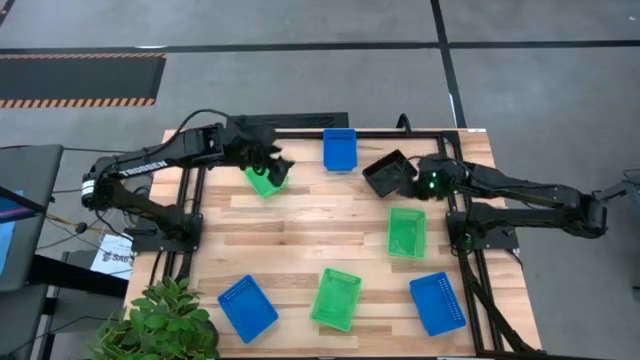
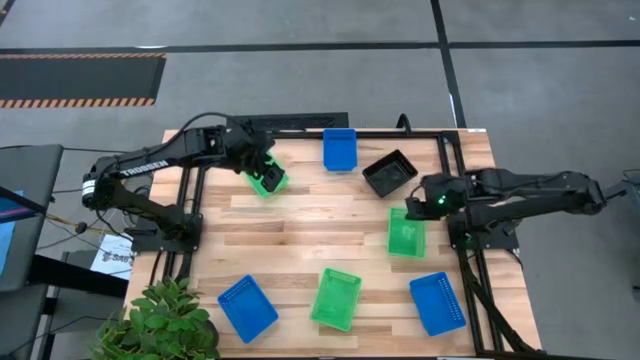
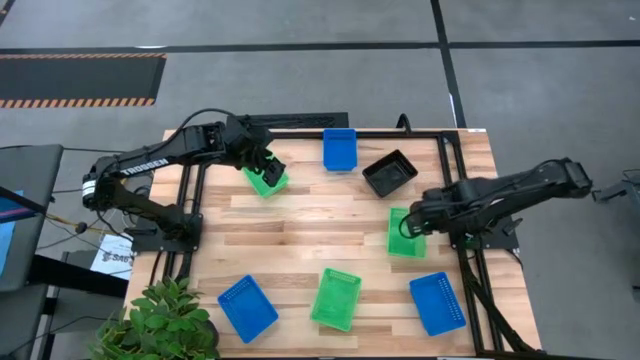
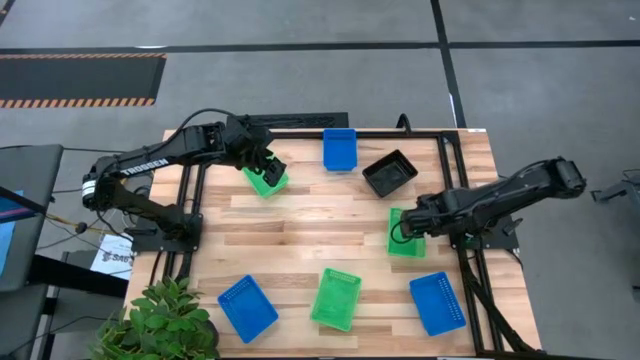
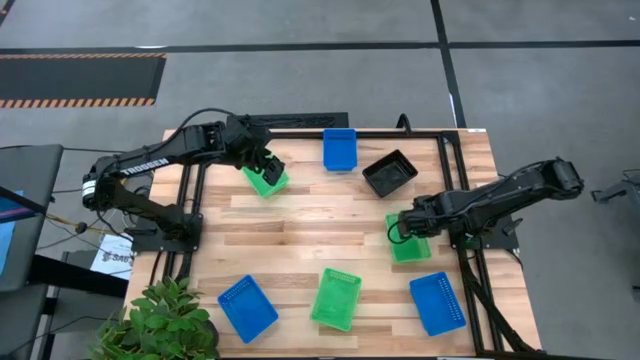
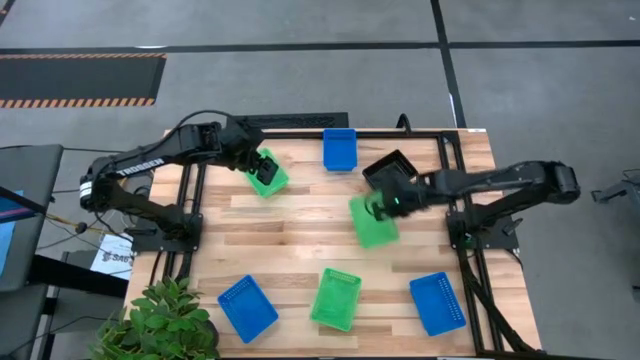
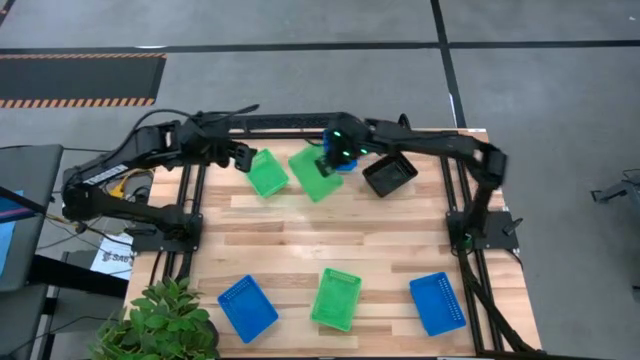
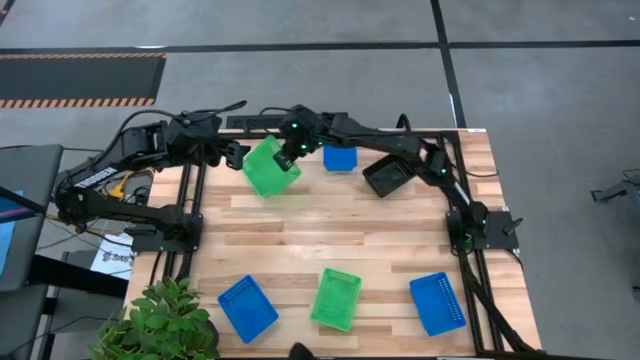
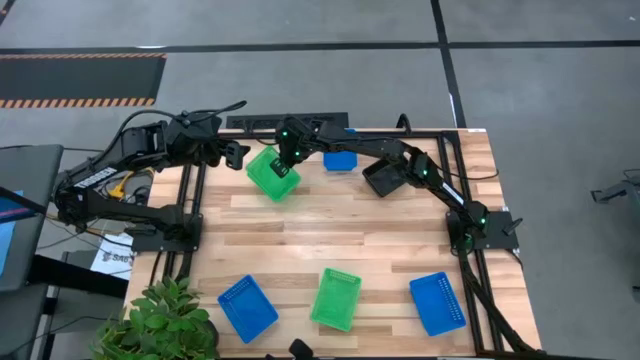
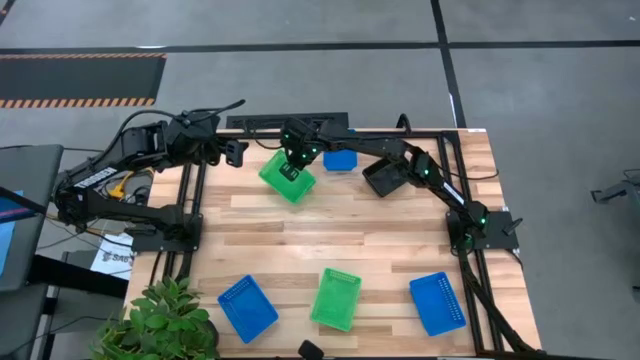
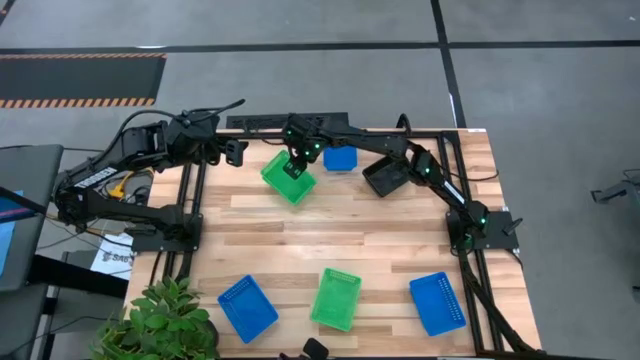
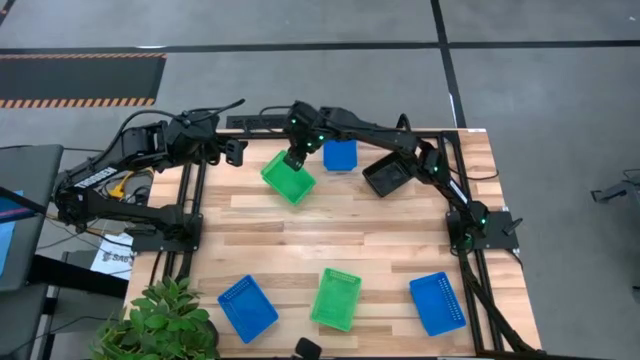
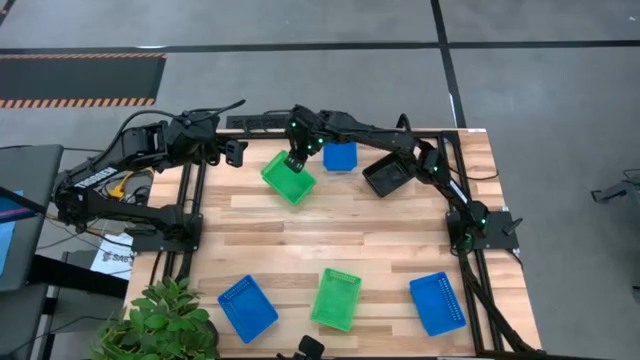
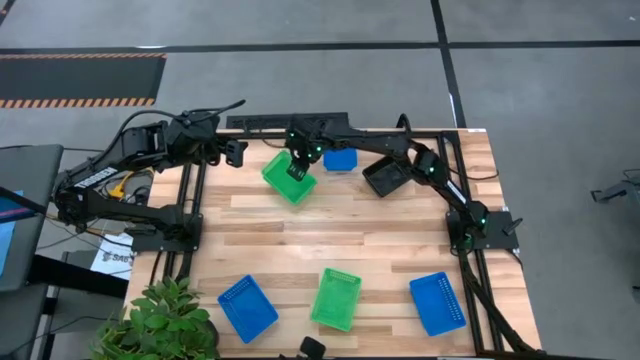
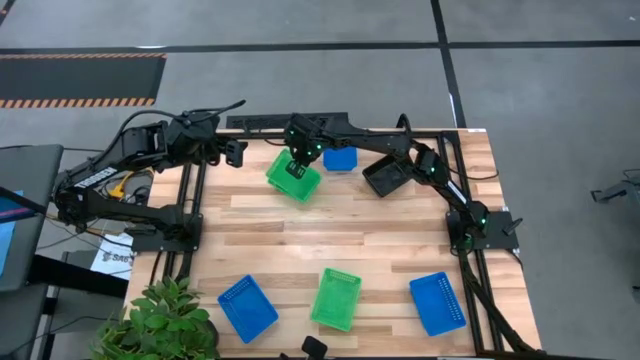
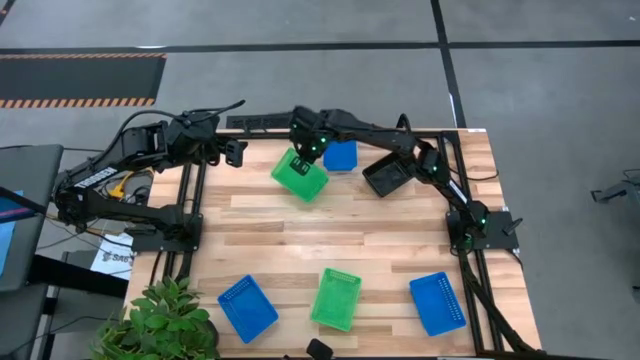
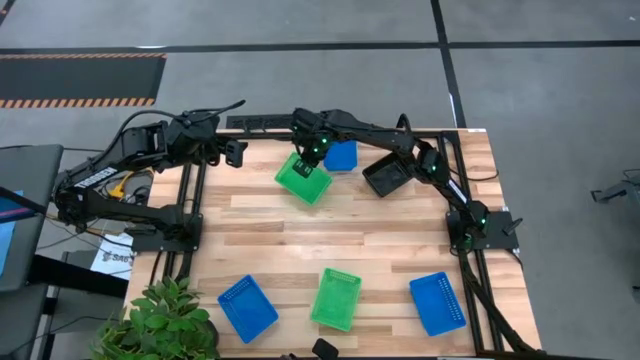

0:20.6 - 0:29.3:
Stack the middle green bin on the top green bin

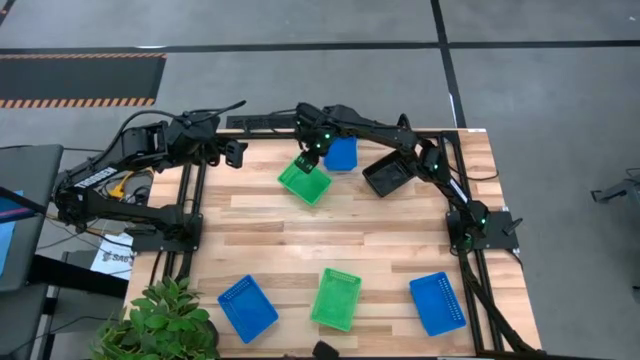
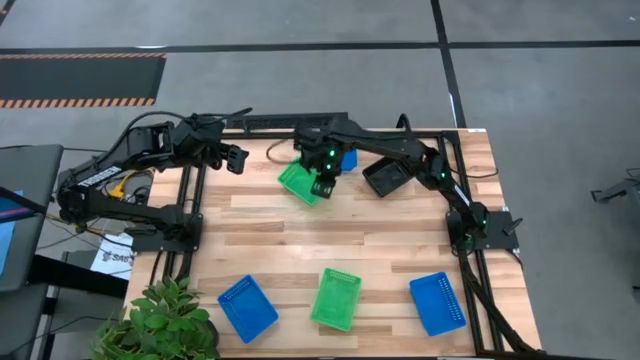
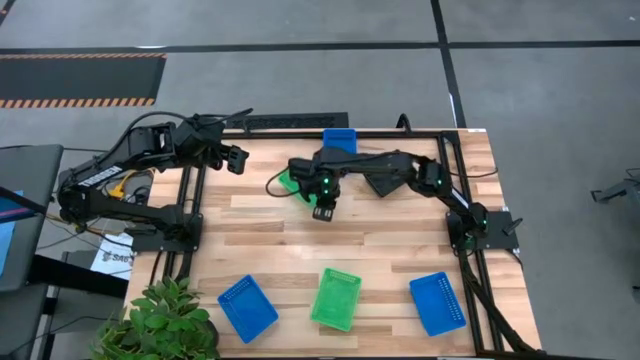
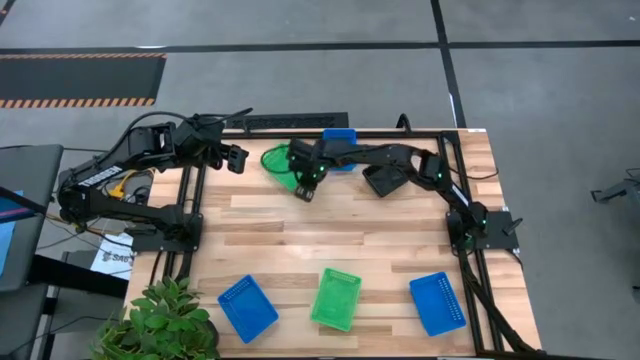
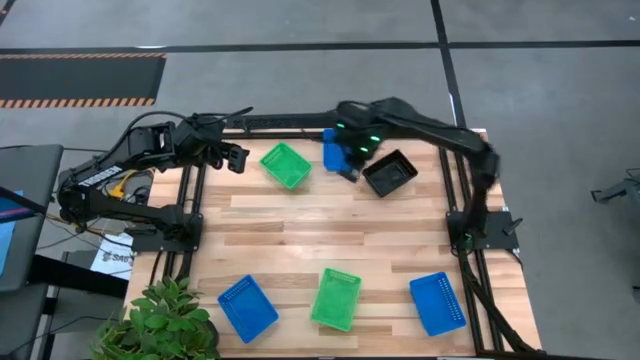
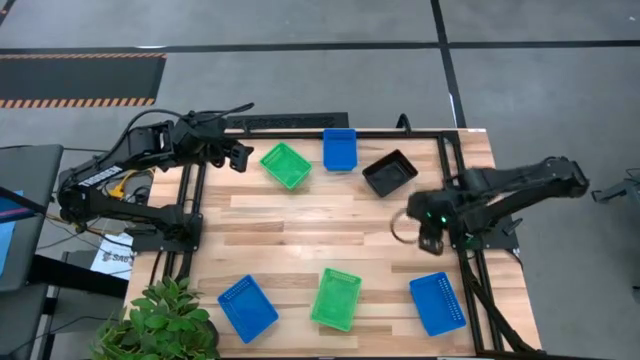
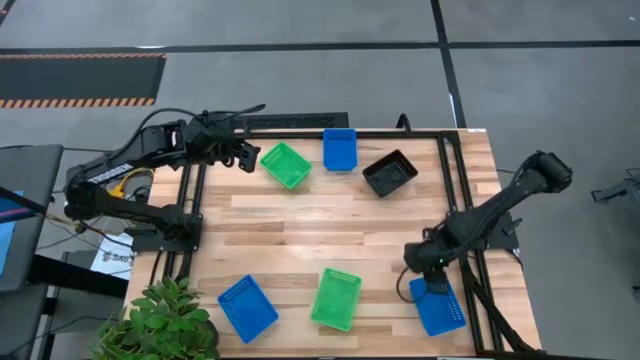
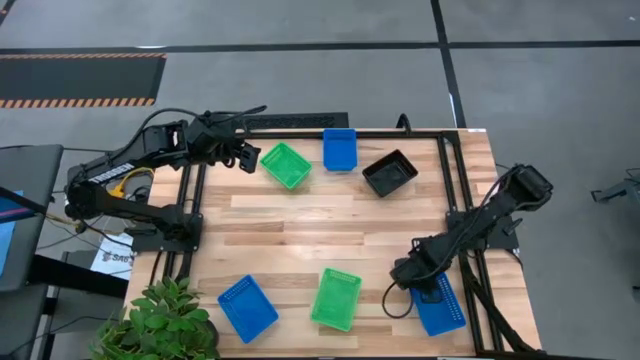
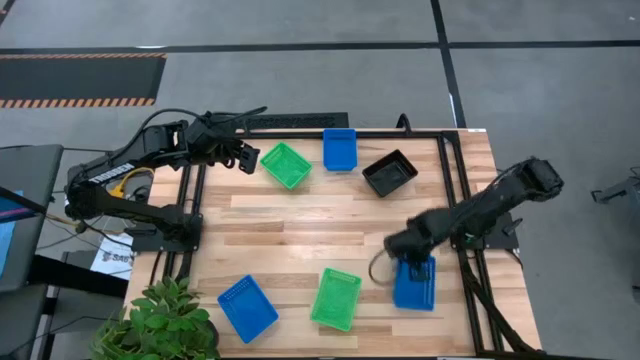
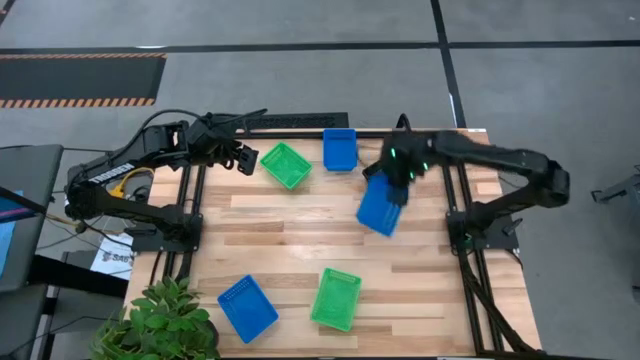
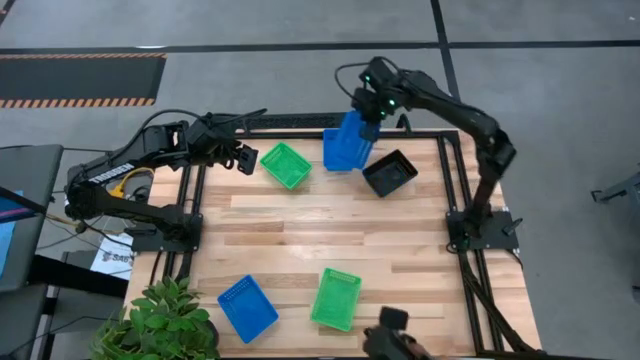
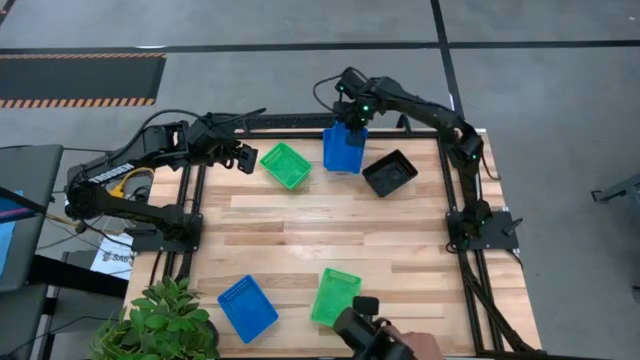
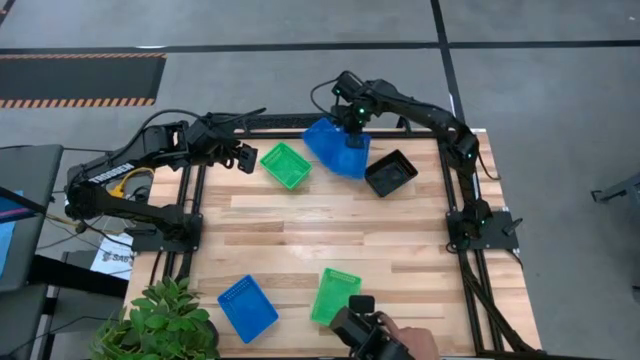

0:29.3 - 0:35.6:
Stack the bottom right blue bin on the top blue bin

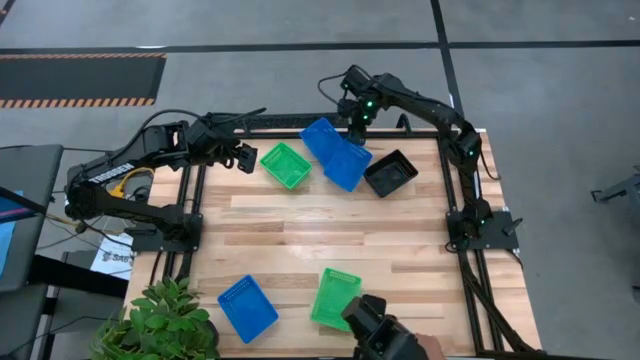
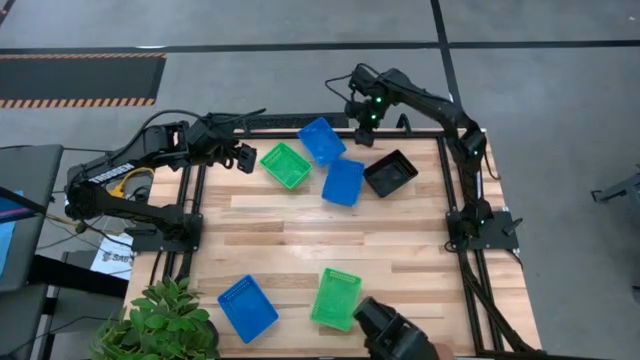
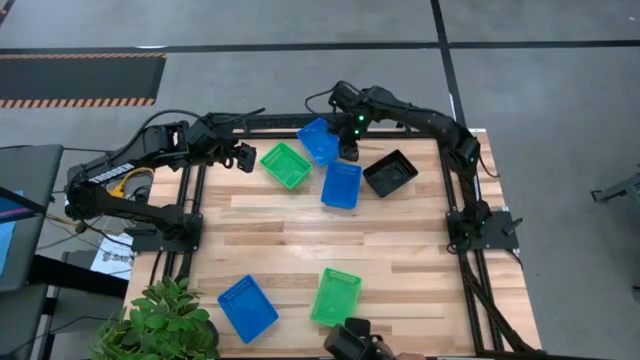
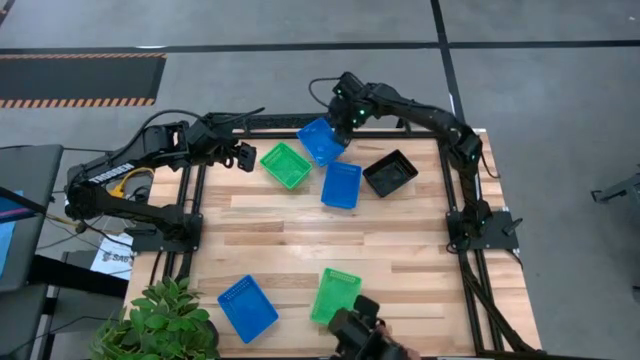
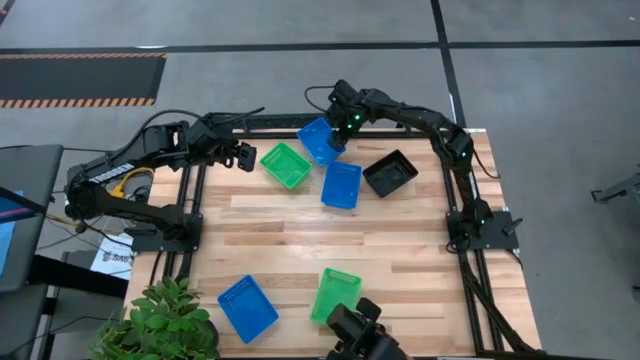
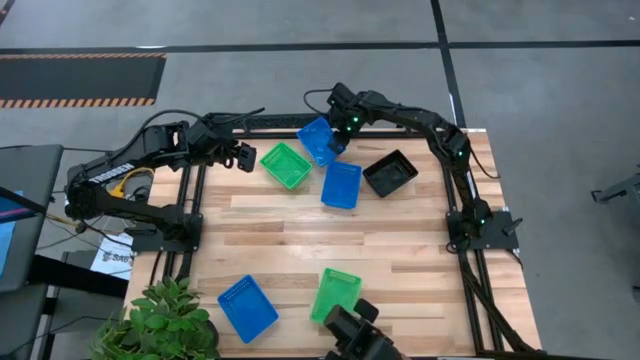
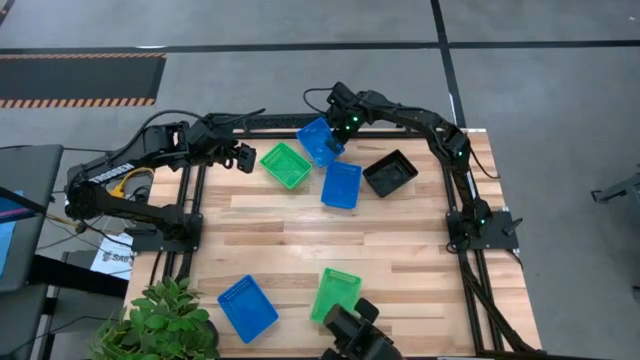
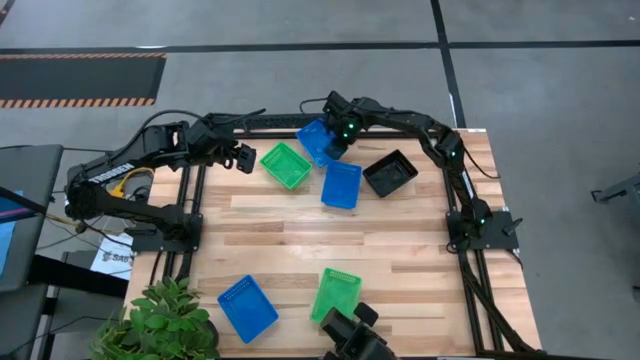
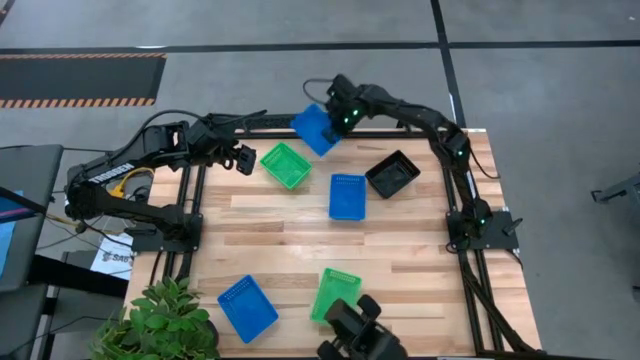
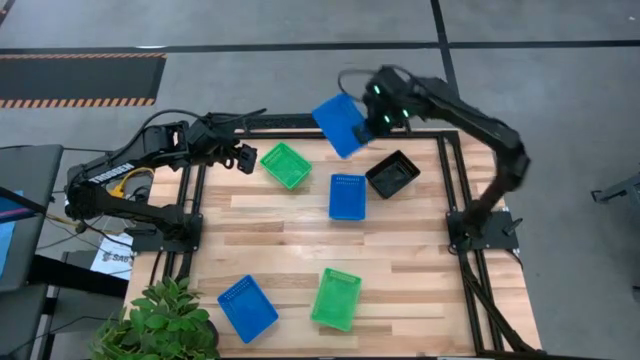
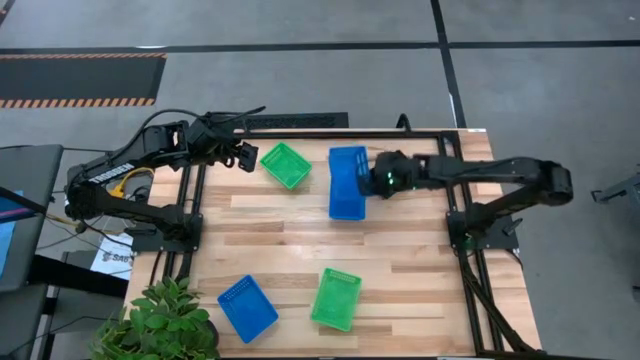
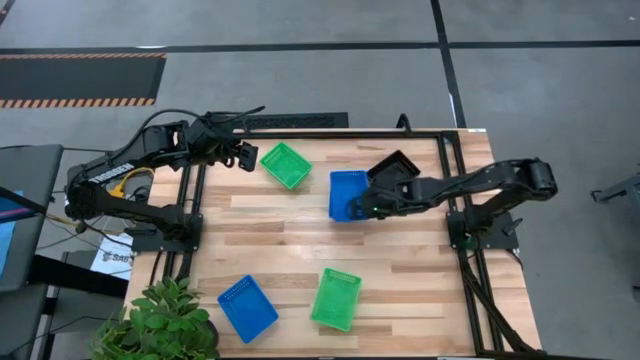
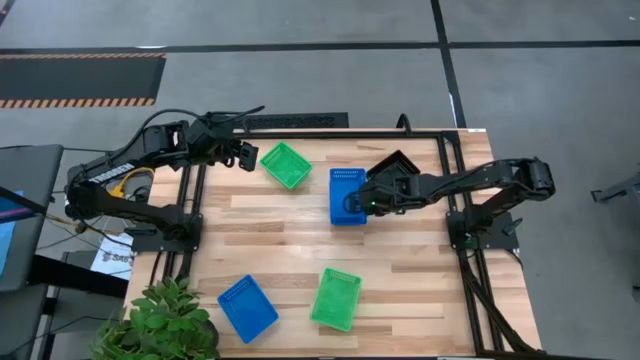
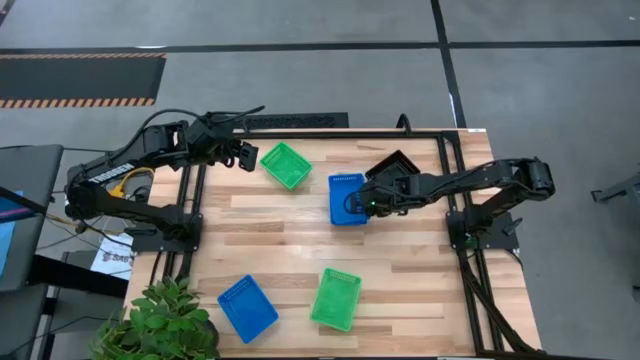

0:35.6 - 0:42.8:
Stack the top blue bin on the middle blue bin

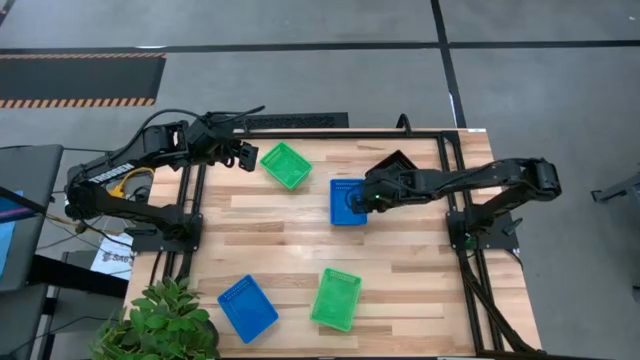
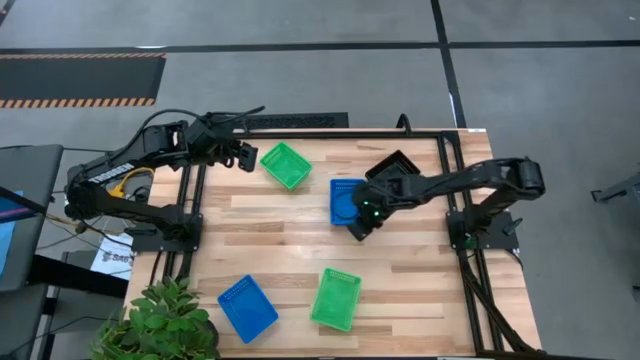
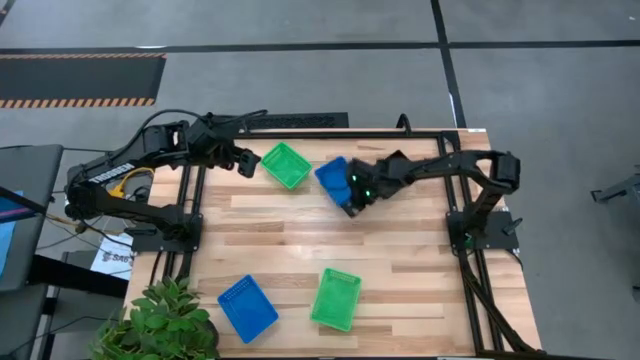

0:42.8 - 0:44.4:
Move the stacked blue bin to the top middle of the stacked green and black bins
